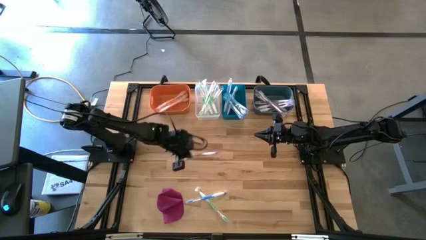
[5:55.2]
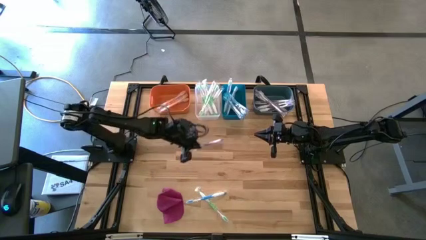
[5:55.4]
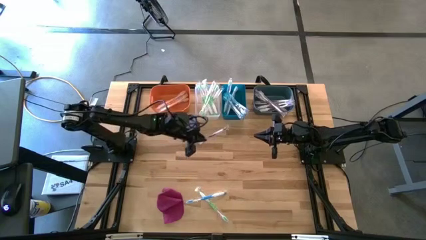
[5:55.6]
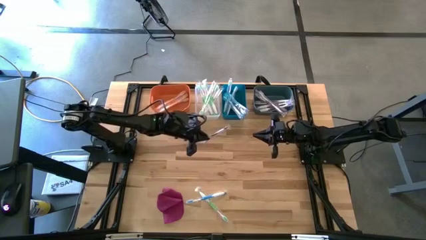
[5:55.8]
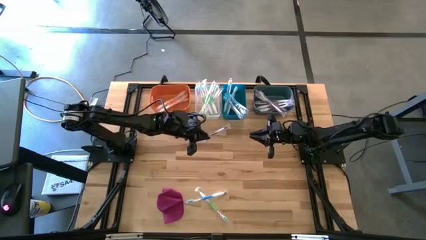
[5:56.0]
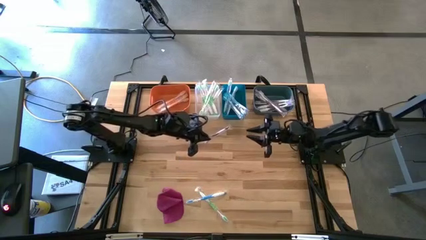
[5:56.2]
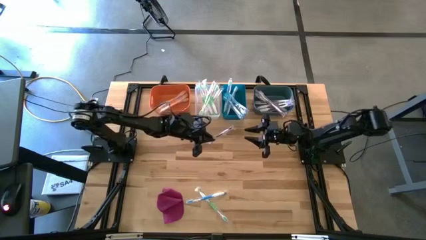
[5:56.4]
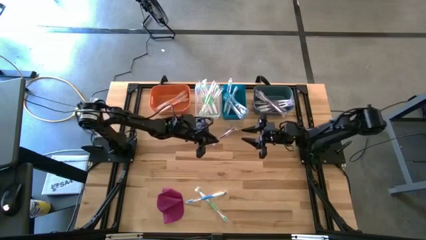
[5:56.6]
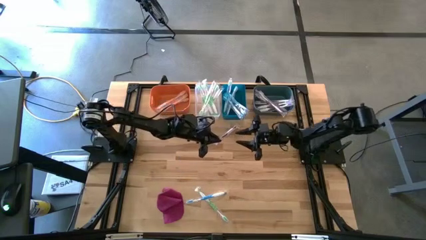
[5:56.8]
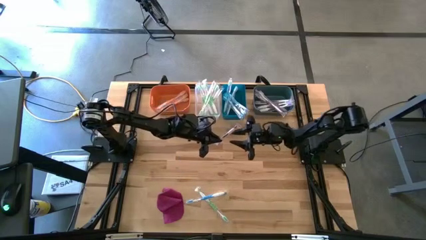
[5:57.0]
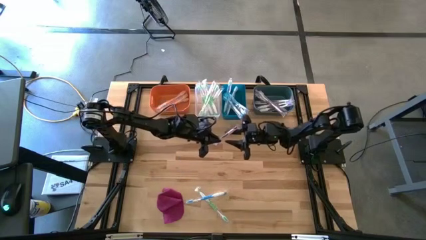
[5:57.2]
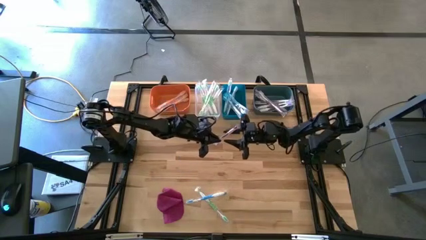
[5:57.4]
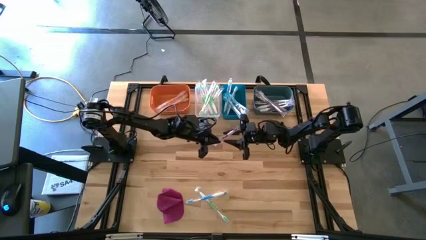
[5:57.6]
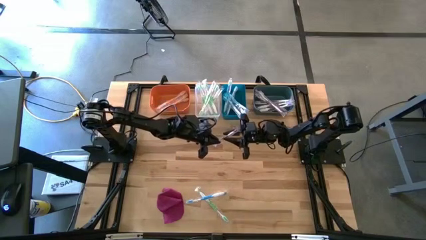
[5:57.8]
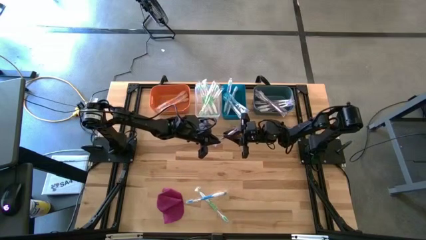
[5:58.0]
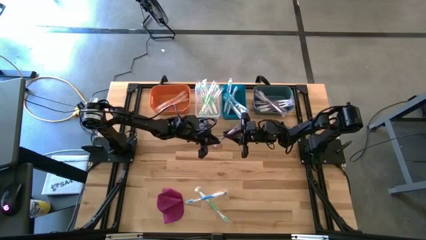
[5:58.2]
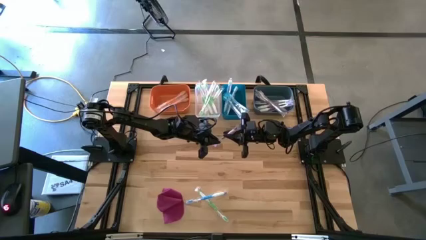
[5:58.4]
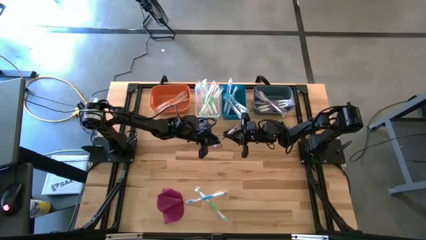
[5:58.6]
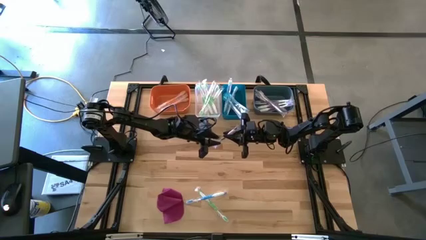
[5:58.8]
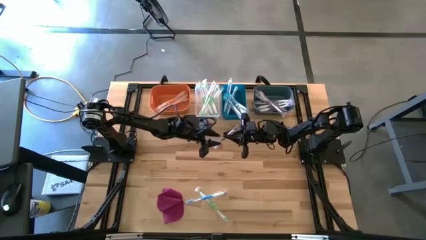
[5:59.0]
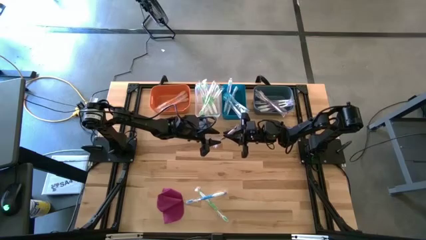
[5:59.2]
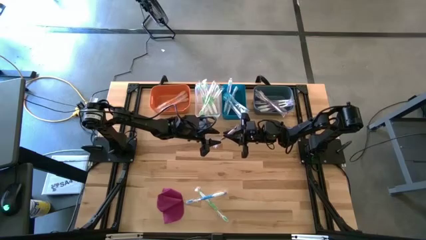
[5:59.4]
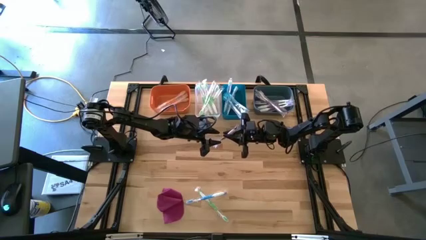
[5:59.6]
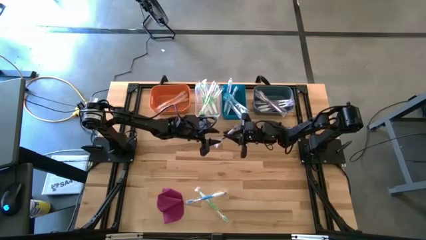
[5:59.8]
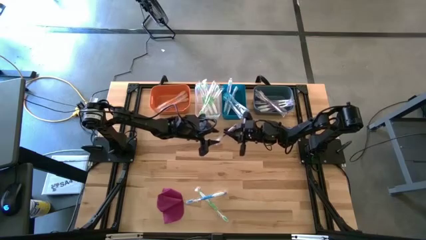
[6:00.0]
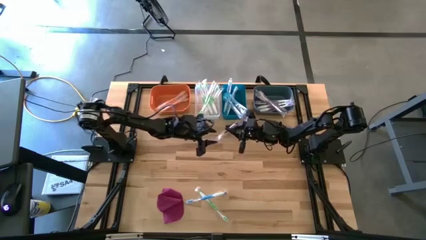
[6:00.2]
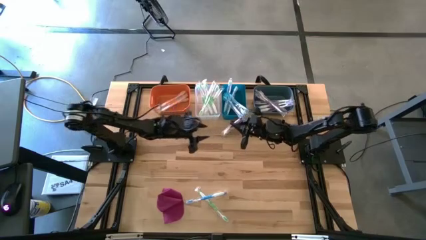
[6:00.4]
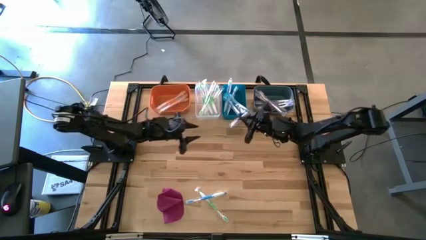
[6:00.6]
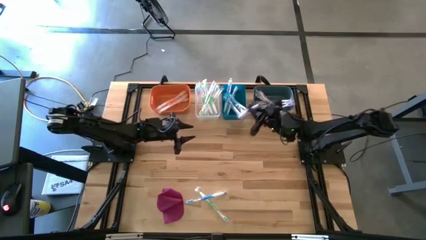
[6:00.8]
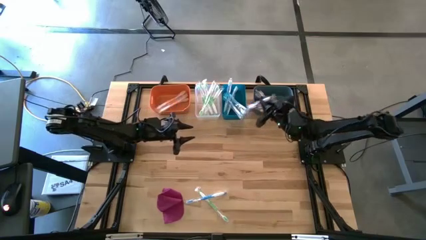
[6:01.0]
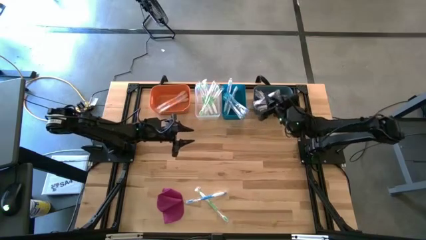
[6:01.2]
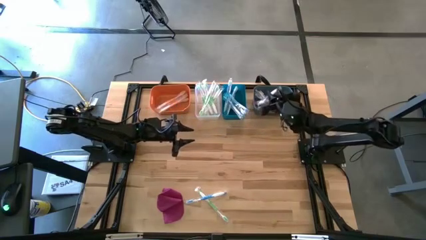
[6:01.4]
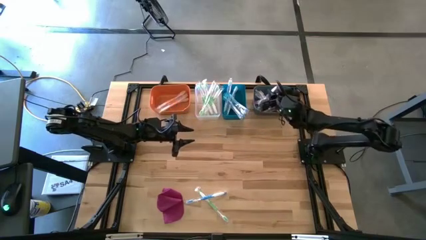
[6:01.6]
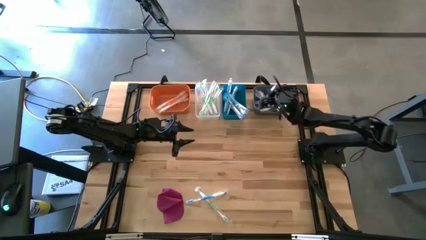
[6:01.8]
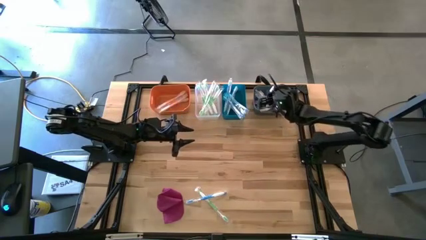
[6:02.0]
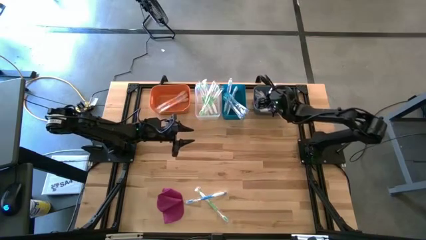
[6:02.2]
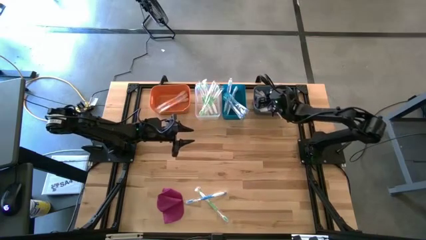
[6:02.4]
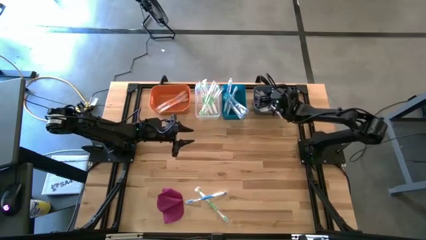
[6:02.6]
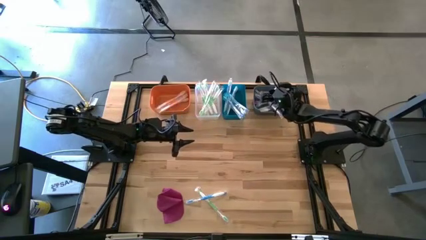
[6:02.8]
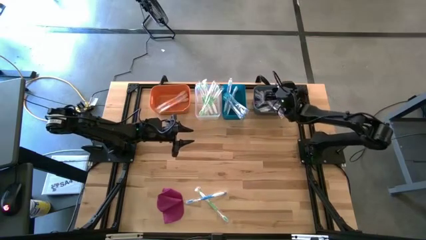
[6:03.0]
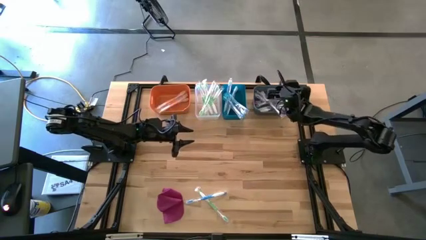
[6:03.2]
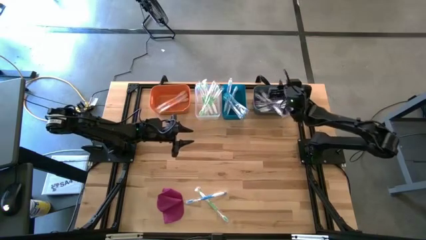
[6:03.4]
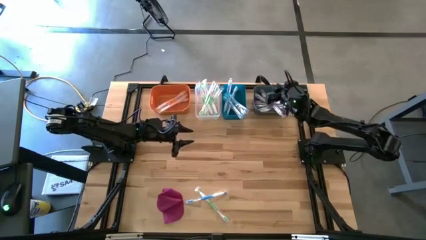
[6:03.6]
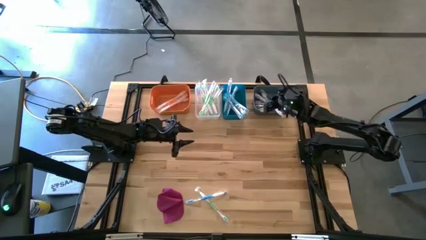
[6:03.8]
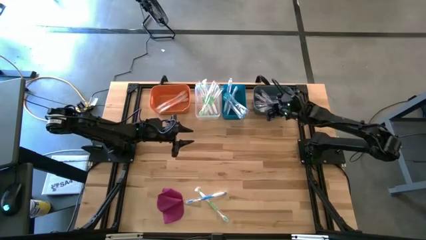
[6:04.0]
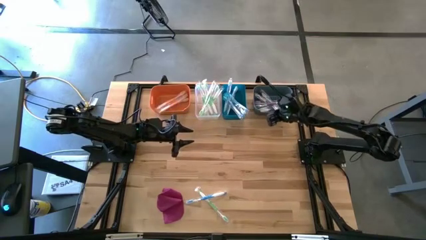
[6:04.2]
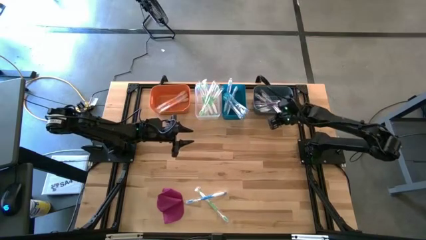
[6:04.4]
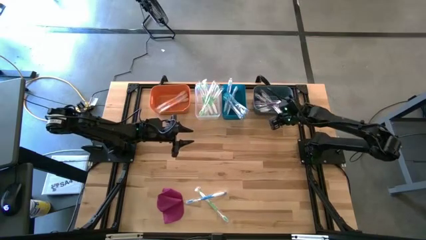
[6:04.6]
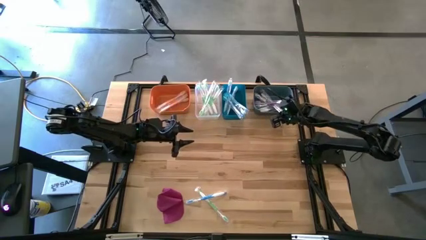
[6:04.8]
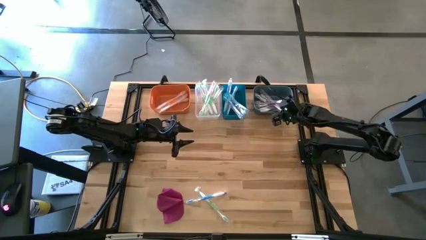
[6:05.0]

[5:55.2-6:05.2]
Task: Pick & Place Toothbrushes
Put the purple toothbrush into the green bin

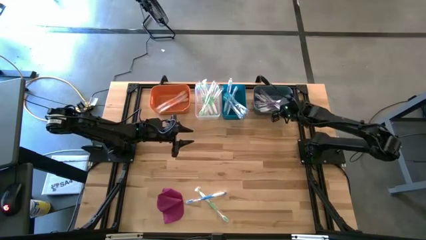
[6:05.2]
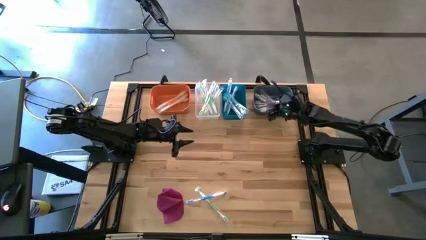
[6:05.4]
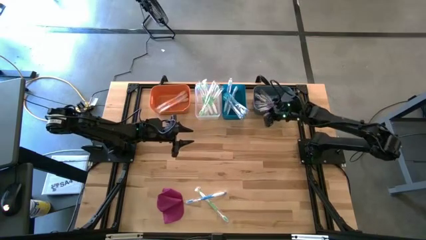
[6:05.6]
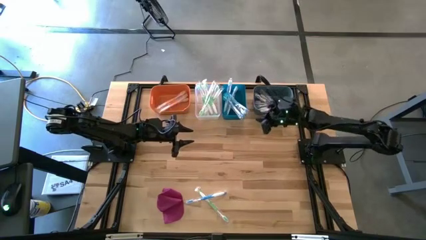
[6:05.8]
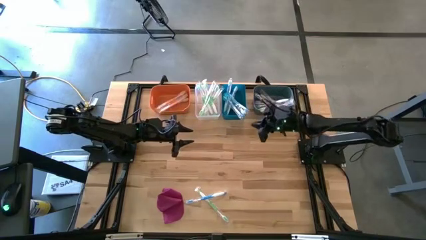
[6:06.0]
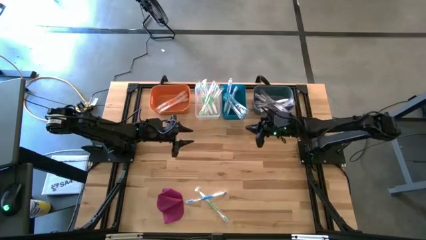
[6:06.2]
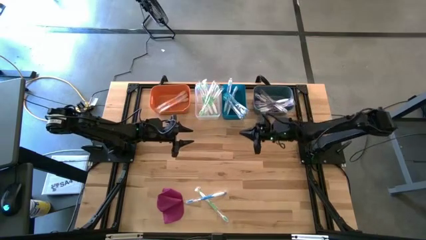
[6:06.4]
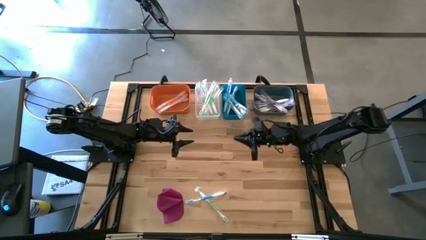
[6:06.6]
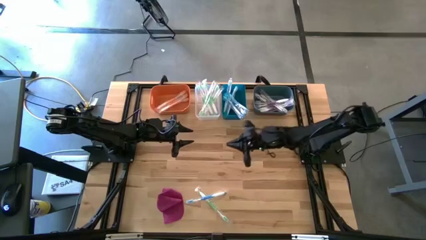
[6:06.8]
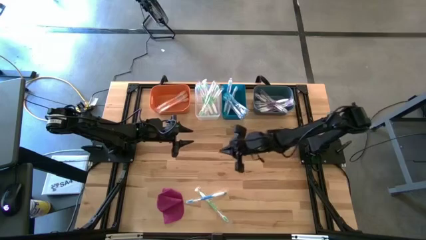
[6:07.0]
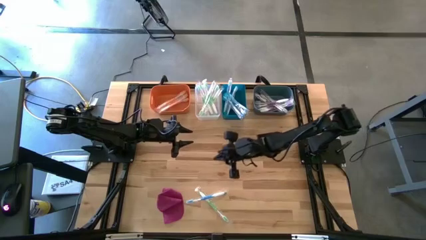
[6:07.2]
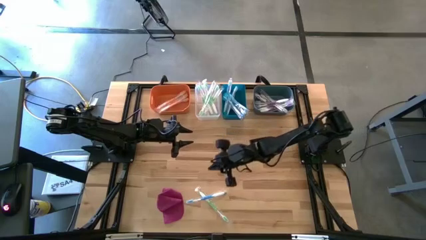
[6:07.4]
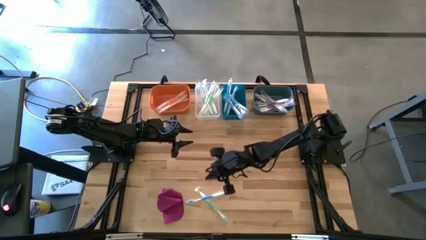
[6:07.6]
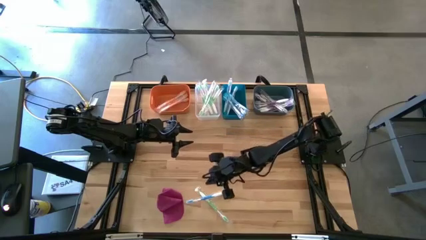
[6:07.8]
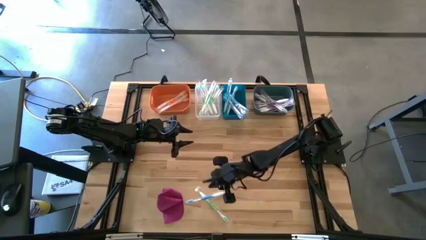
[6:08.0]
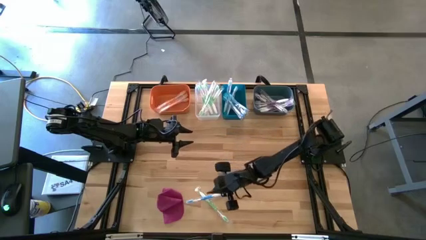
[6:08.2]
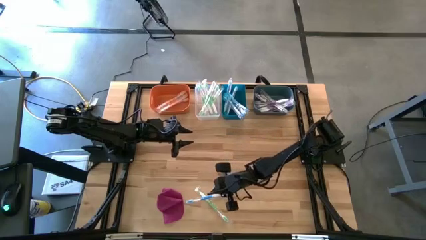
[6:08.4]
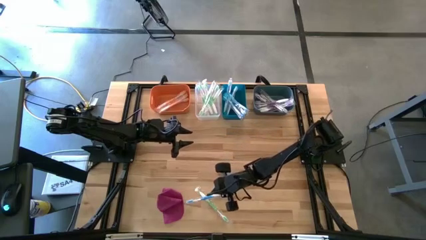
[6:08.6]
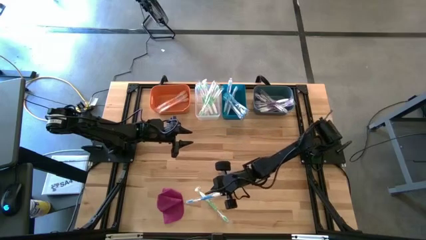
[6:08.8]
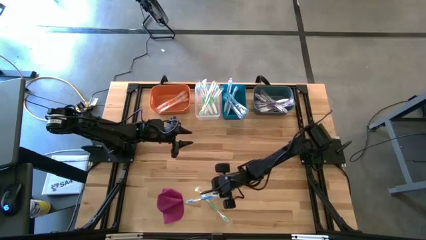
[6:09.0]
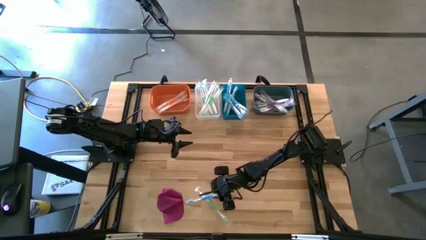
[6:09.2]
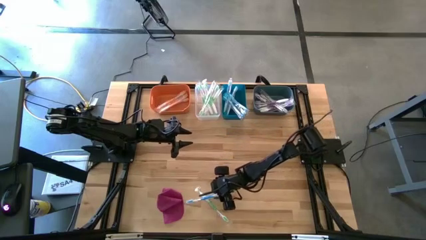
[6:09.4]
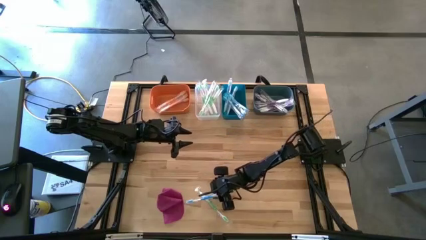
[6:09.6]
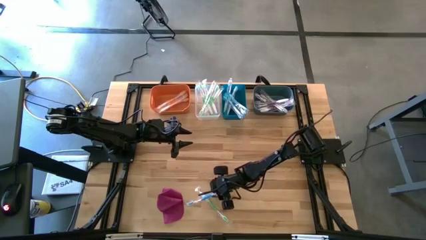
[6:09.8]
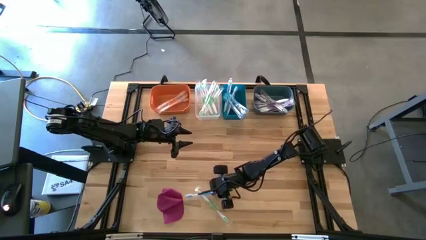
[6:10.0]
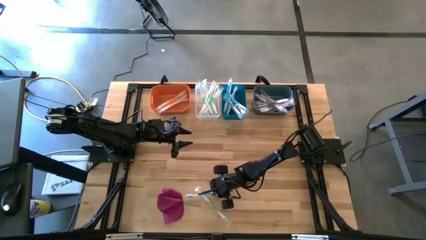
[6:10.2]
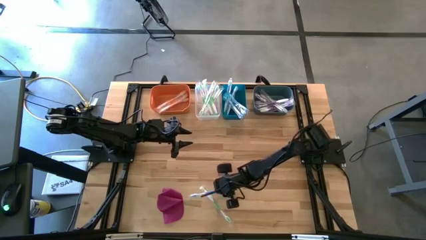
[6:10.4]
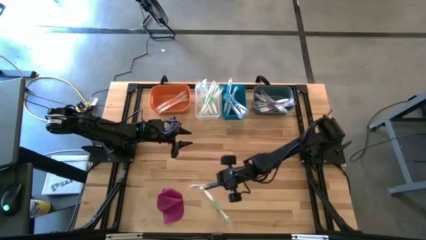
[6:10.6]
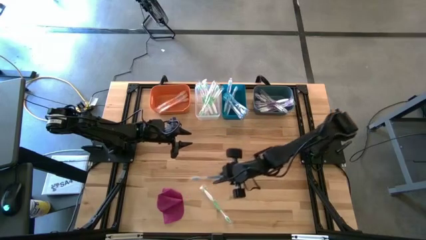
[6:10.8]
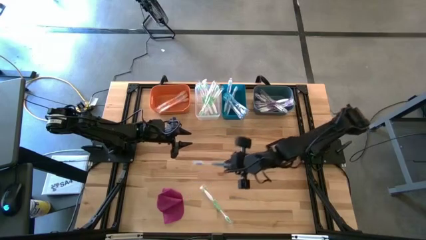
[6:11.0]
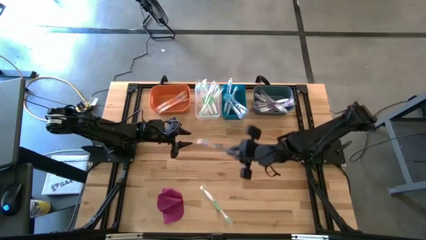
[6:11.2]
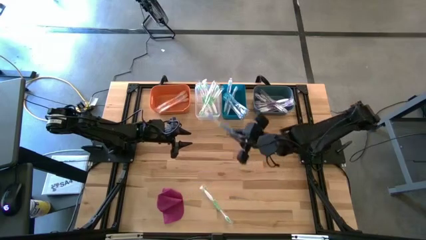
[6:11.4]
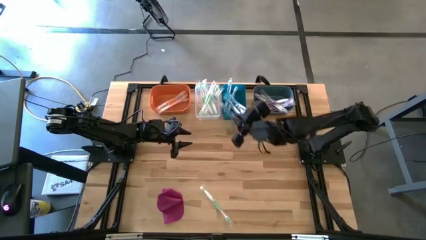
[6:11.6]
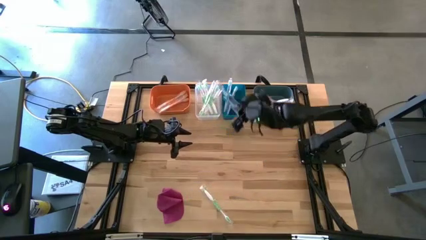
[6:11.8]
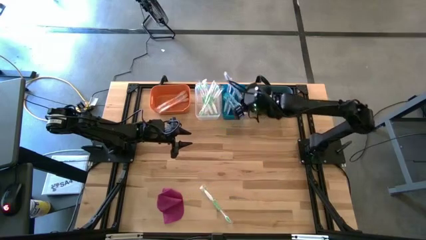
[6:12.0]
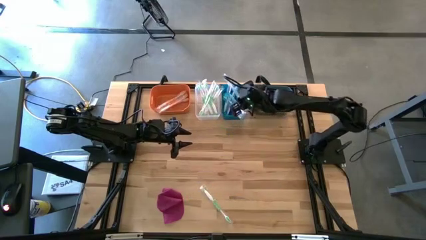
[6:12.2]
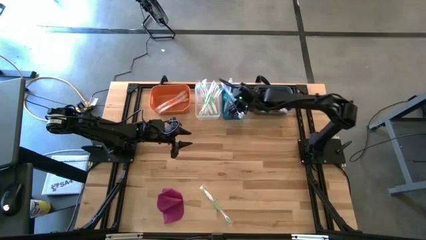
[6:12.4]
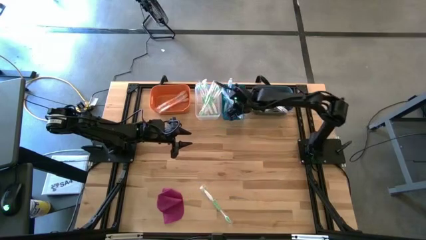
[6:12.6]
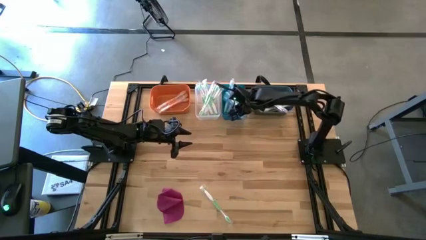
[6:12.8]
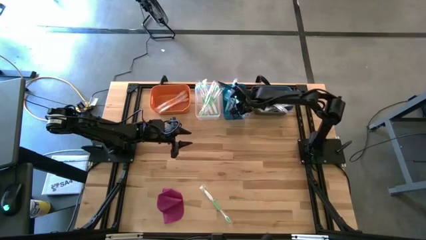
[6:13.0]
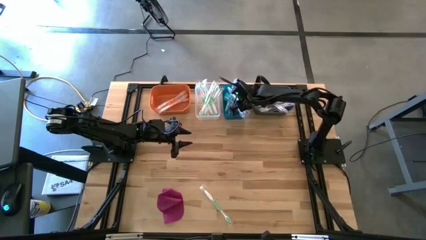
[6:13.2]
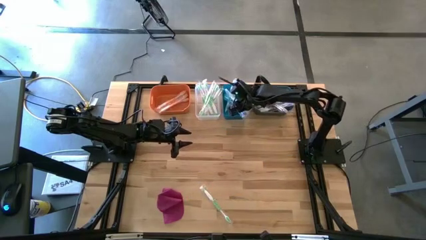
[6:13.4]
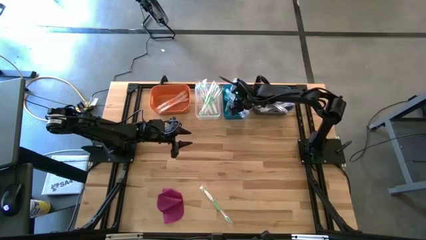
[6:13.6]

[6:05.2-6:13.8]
Put the blue toothbrush into the blue bin
